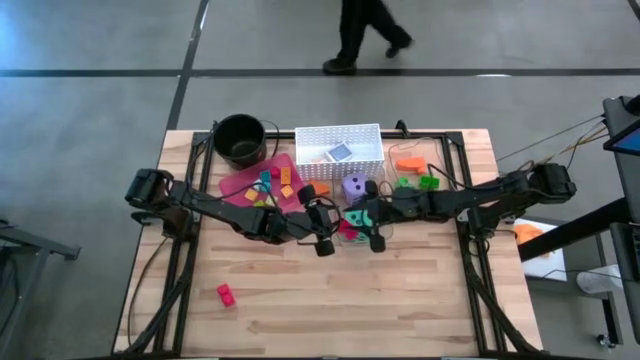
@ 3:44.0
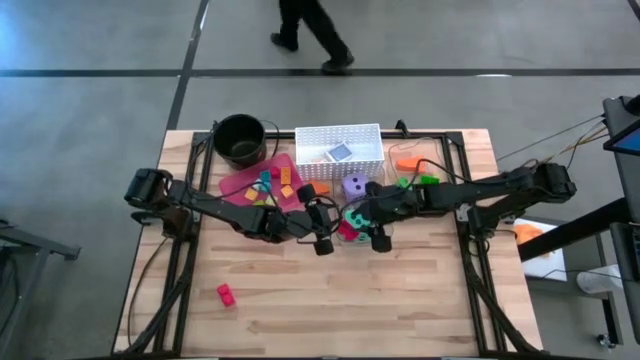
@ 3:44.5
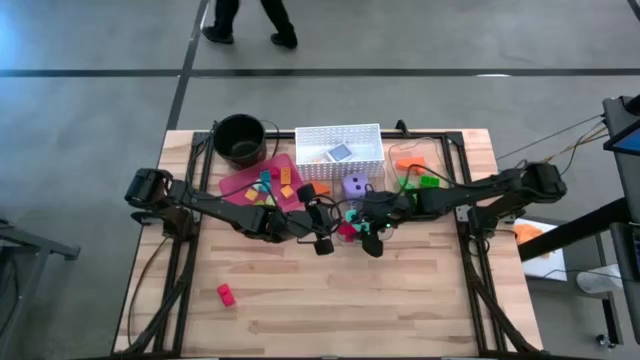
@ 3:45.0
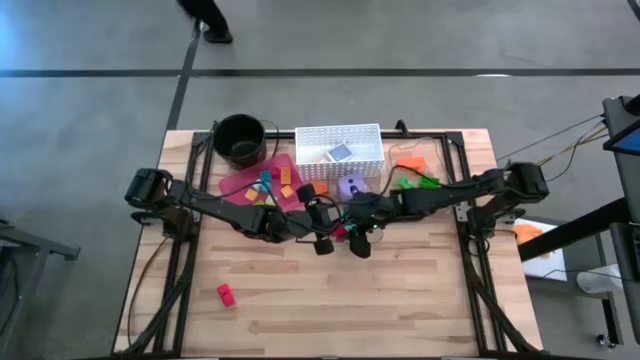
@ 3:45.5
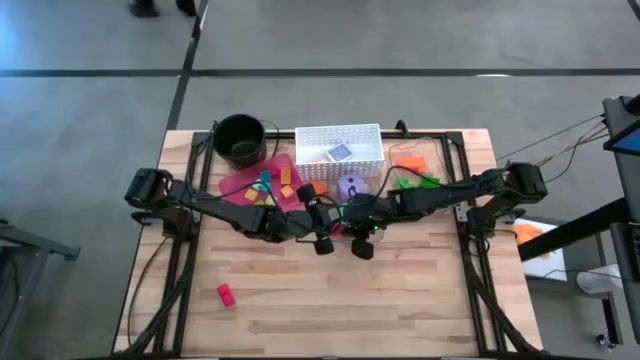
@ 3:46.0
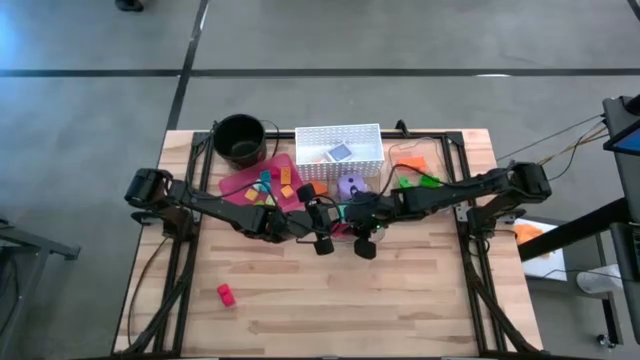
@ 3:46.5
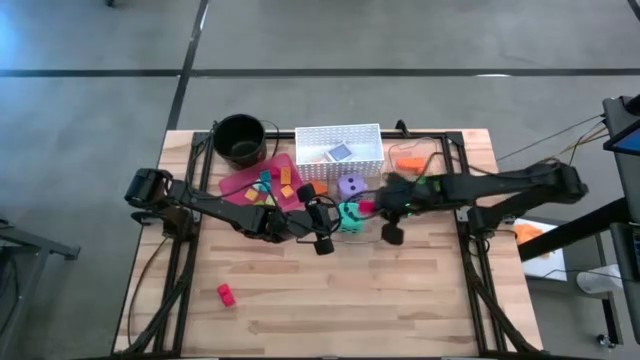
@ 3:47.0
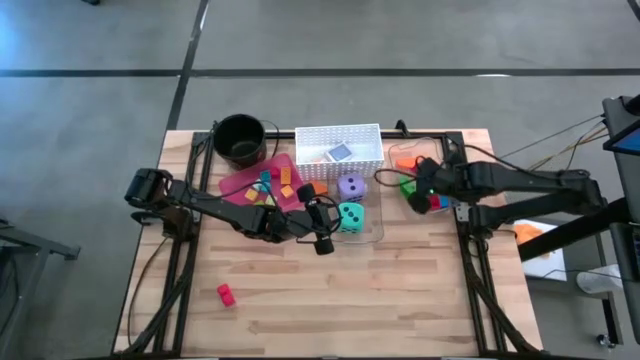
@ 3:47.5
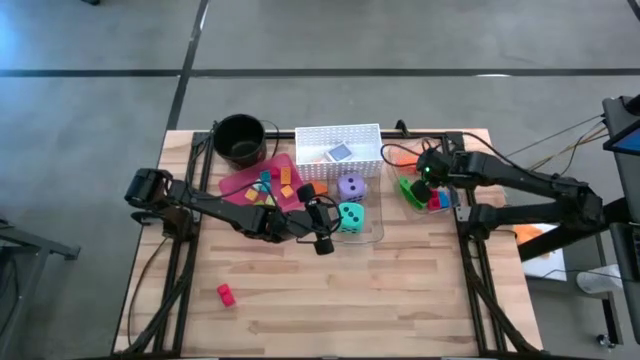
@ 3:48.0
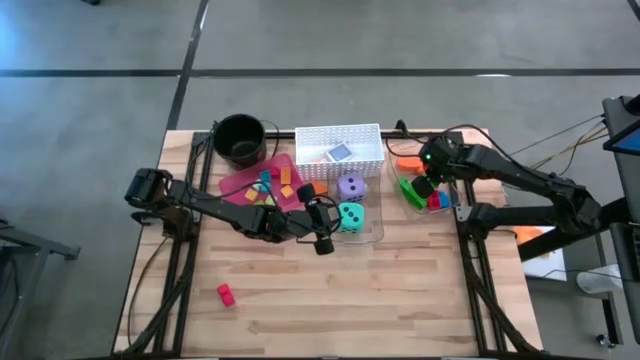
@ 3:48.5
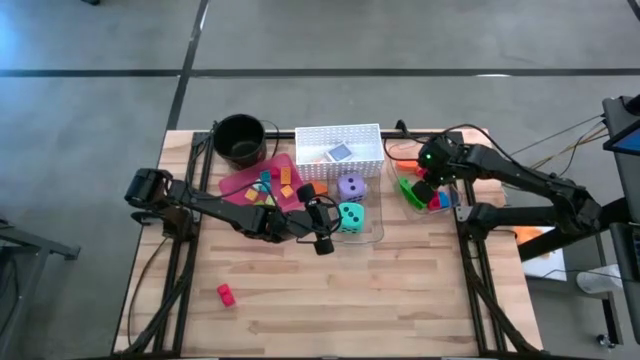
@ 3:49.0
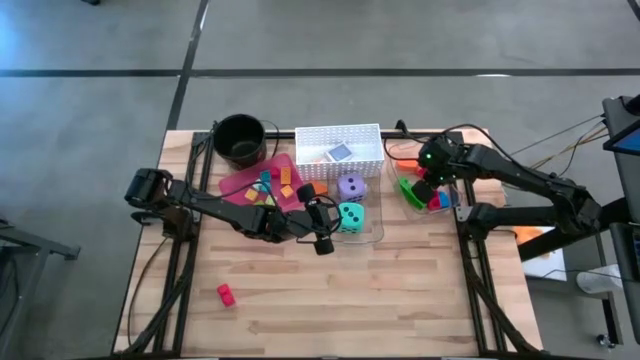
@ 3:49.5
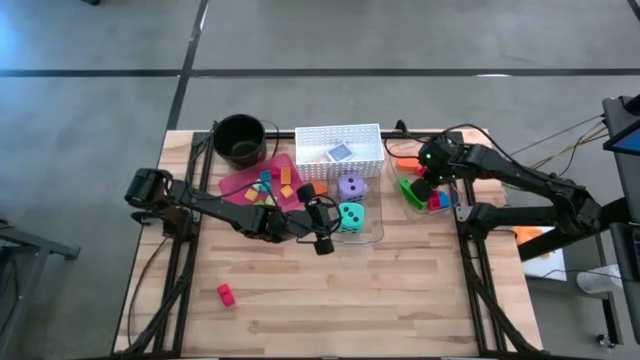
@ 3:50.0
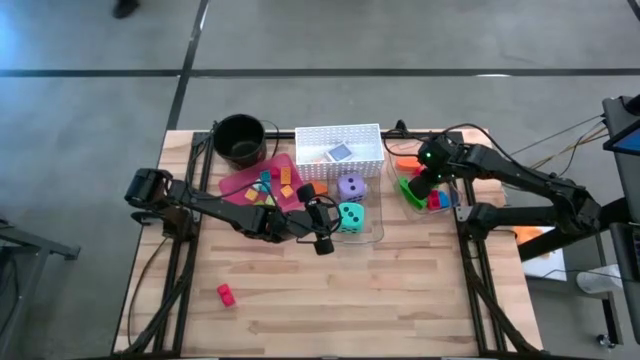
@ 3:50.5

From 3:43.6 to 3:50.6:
Task: Pick & Place Toys
Put the bottom large red game piece into the top transparent bin

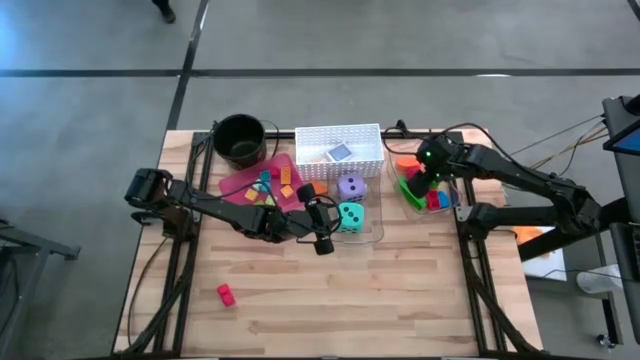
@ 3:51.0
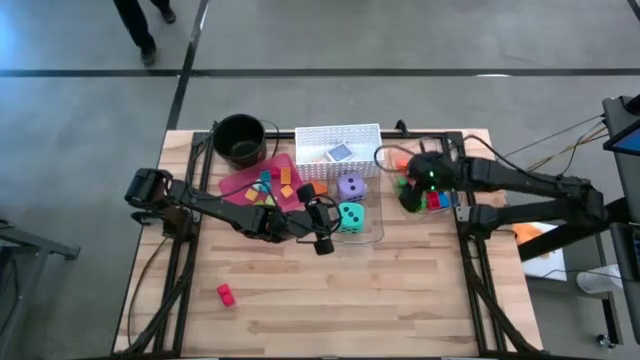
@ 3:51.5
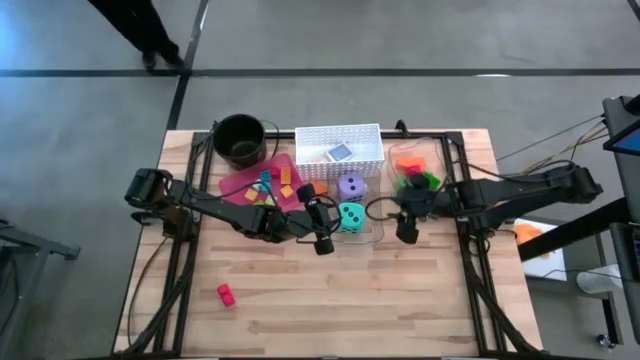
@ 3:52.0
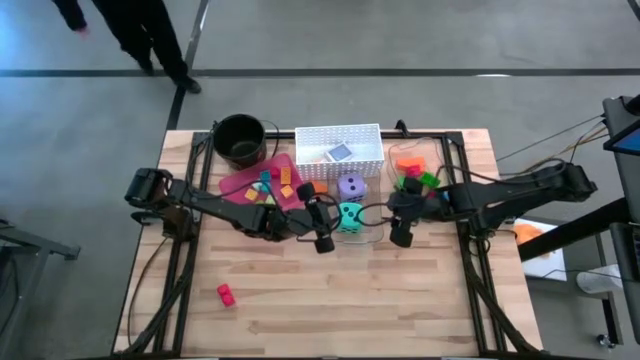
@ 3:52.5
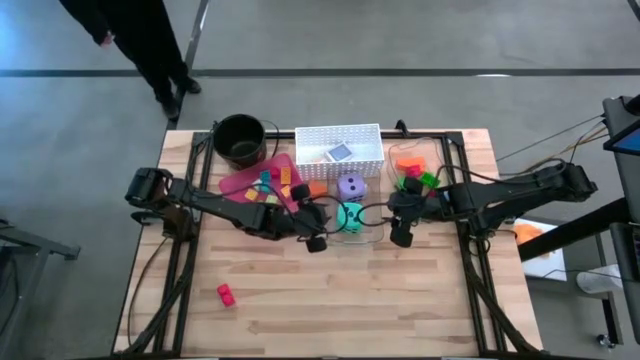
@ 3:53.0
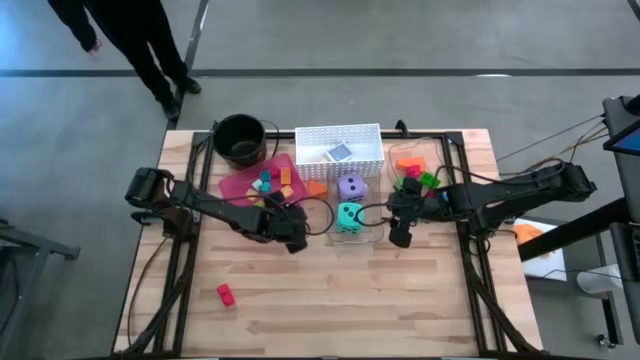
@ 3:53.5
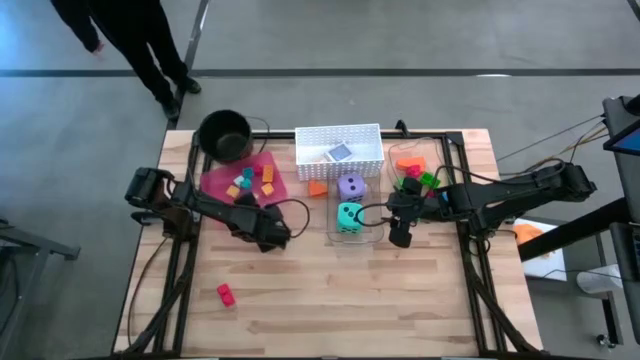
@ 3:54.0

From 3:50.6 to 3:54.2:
Adjust the red bin on the table

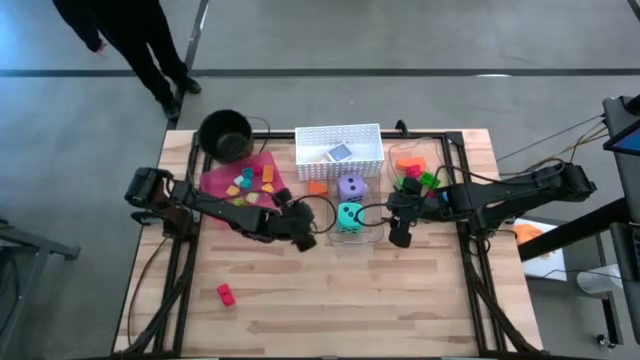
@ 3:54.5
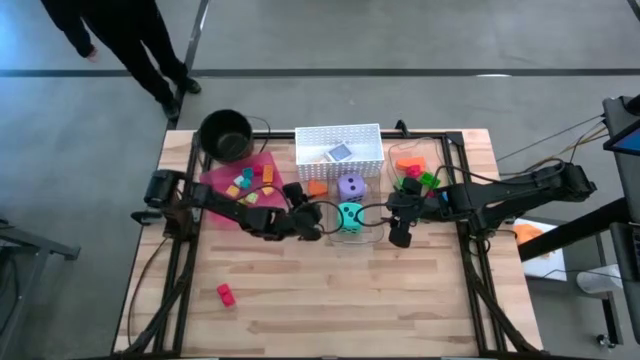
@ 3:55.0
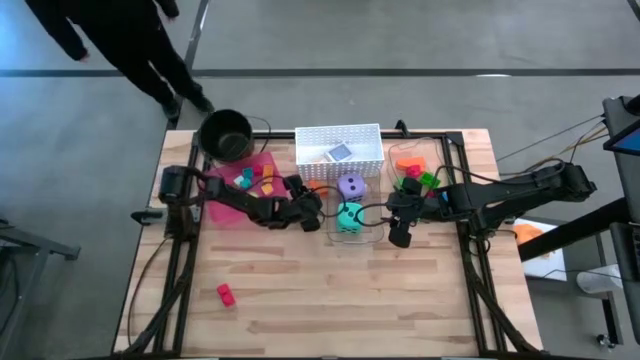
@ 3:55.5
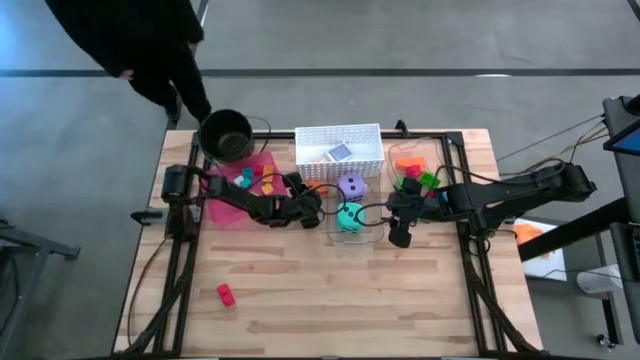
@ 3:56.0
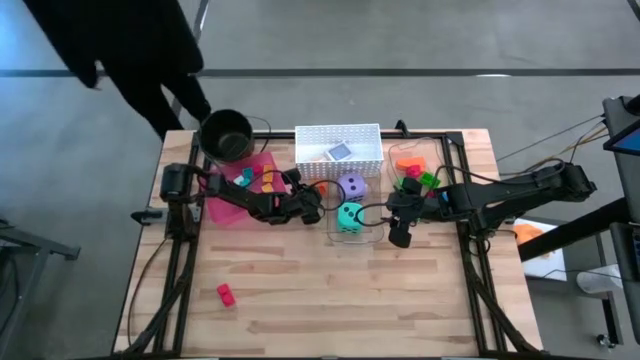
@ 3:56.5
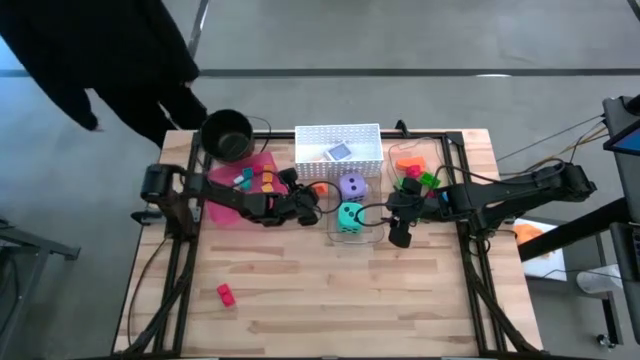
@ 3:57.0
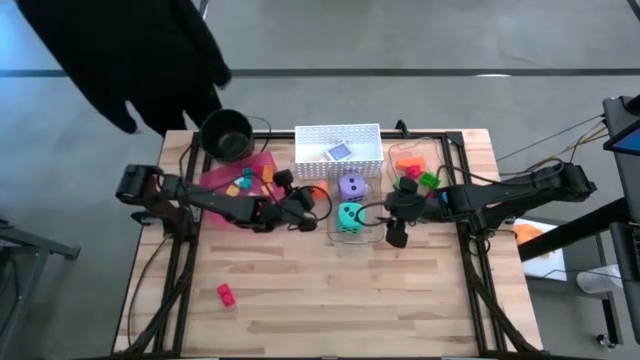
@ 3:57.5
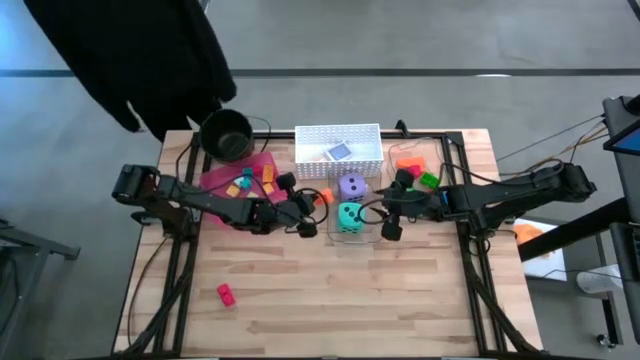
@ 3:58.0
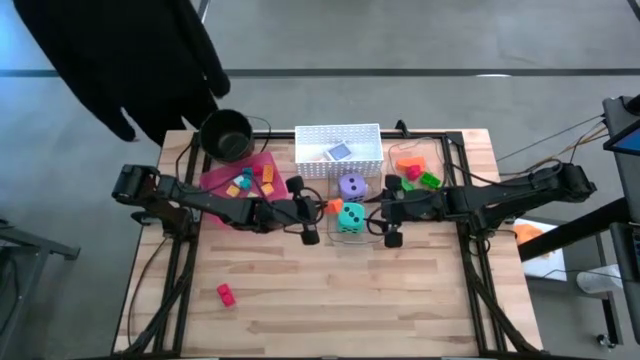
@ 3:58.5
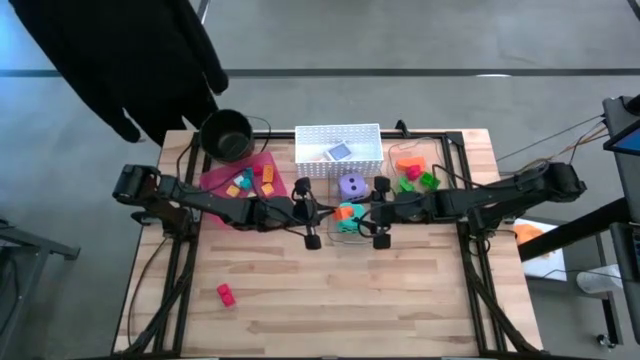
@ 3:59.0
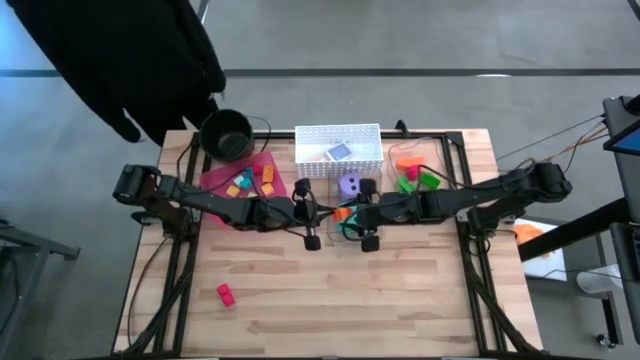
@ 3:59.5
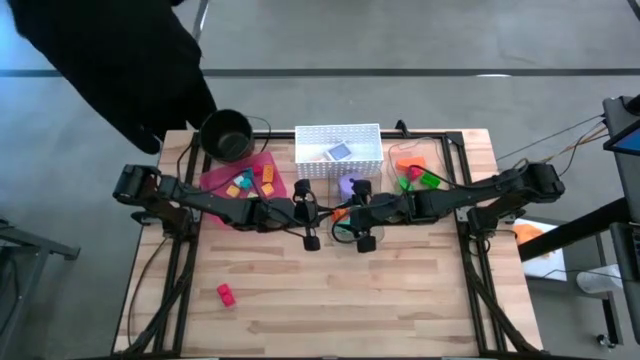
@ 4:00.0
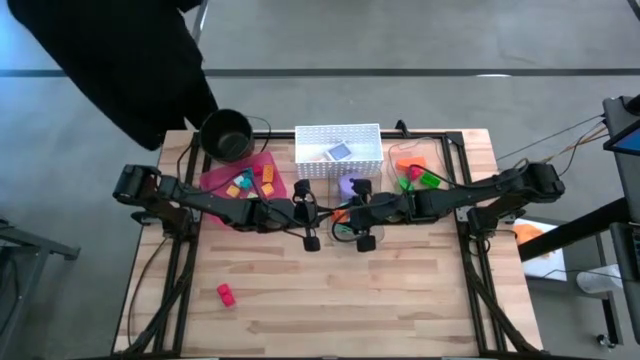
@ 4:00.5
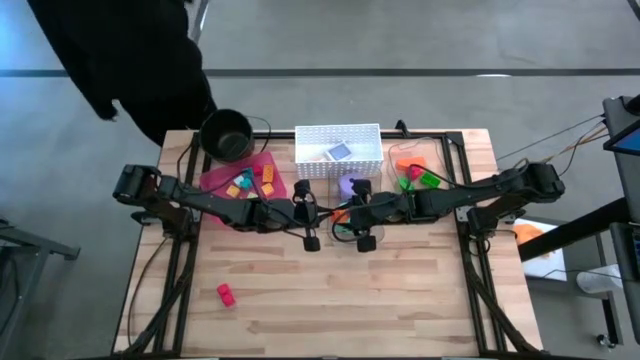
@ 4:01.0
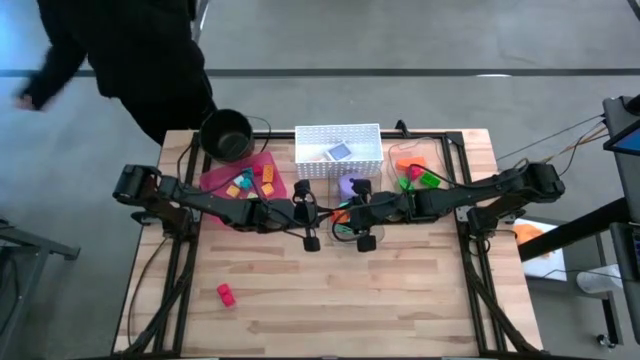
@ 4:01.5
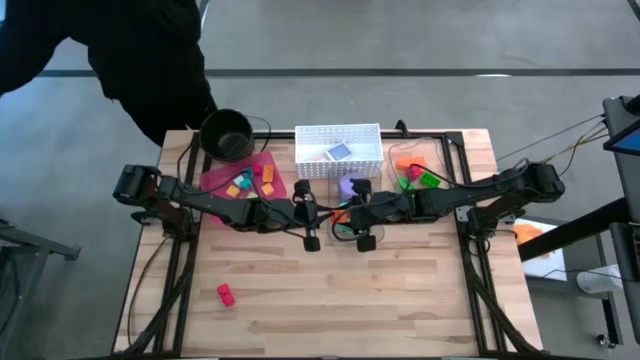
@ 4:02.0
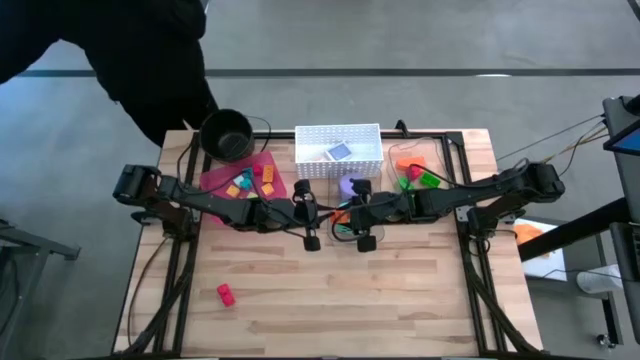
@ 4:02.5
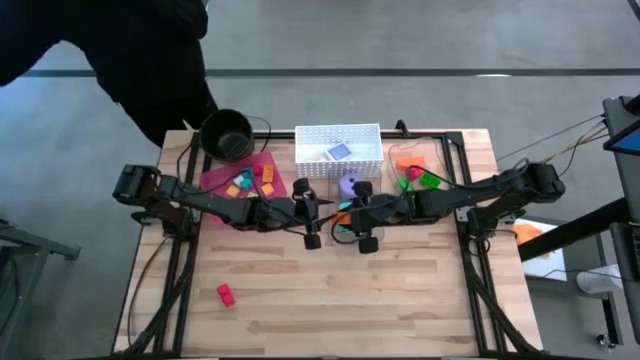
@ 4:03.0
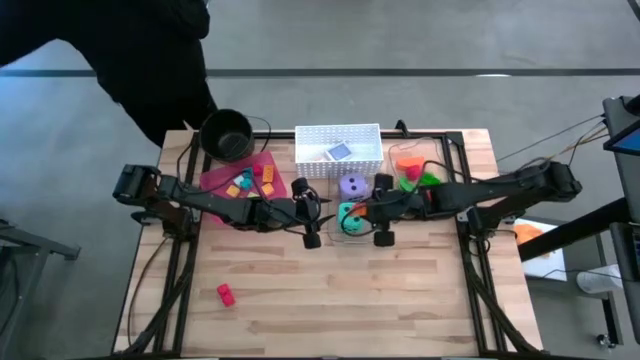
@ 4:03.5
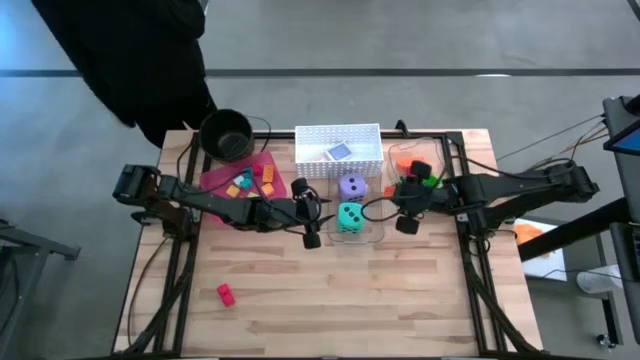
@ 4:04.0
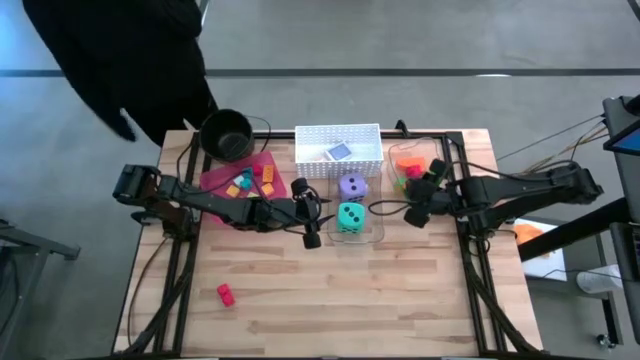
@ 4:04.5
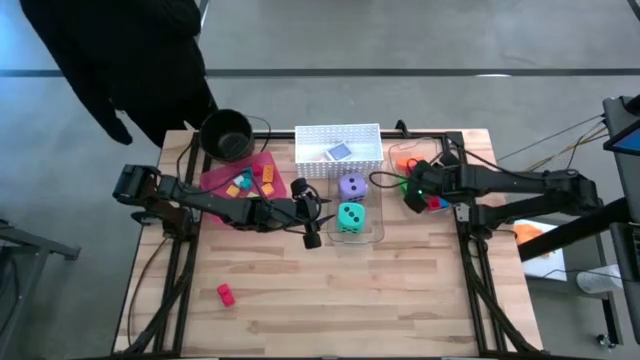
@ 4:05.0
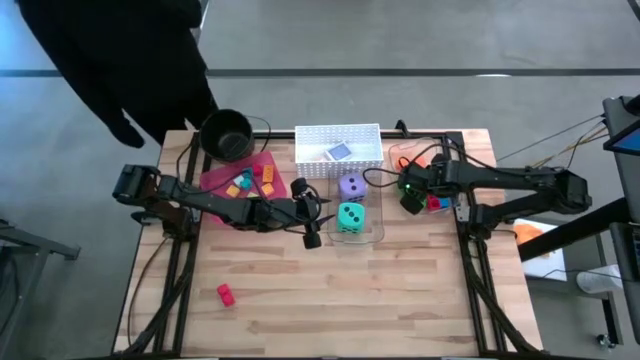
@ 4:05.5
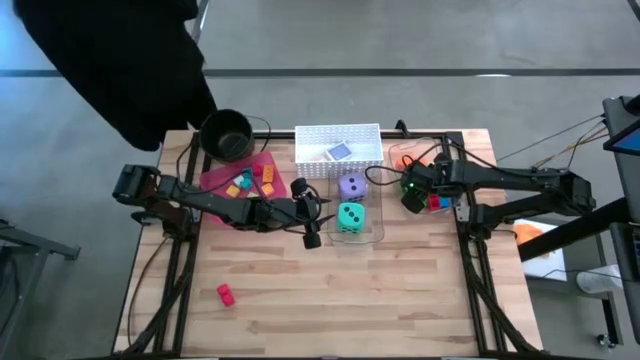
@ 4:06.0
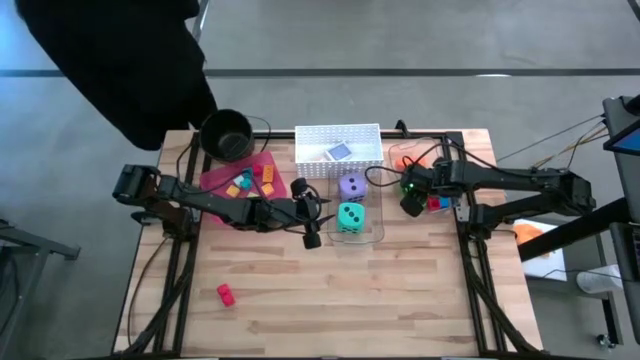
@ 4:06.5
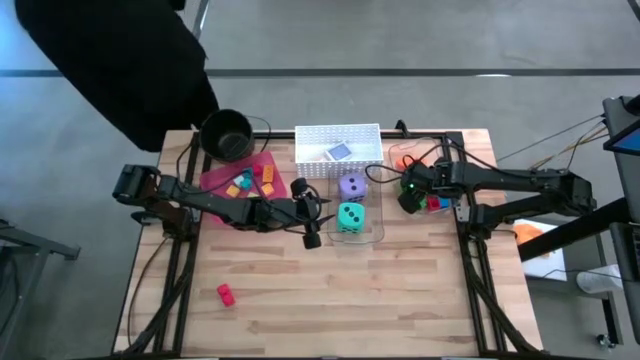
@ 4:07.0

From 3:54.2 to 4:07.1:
Put the large orange game piece into the top transparent bin
